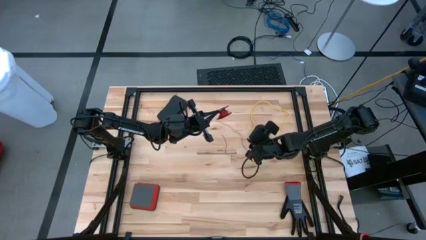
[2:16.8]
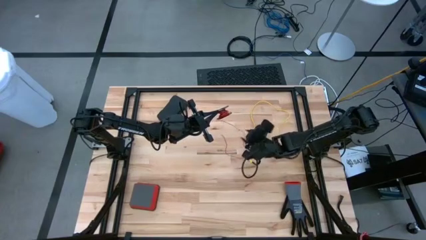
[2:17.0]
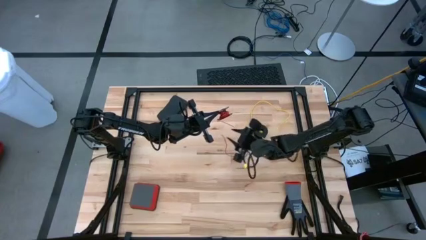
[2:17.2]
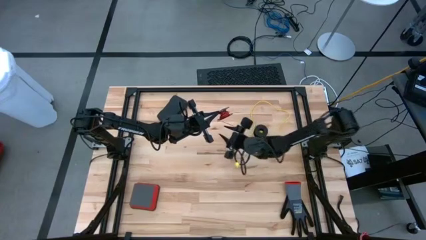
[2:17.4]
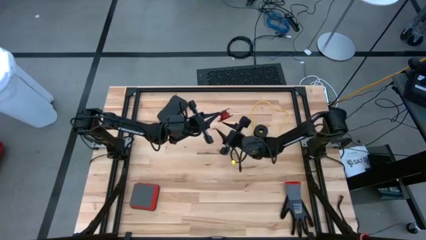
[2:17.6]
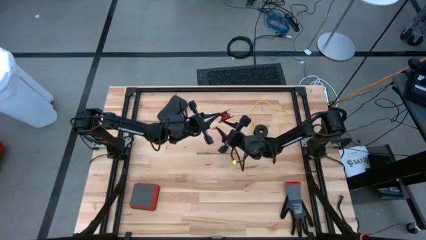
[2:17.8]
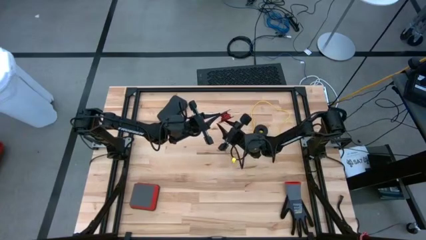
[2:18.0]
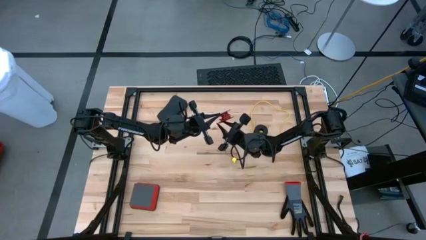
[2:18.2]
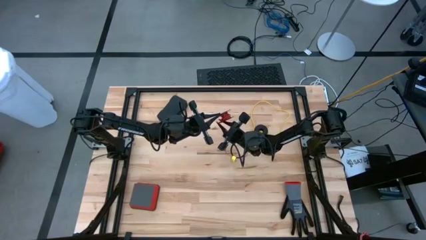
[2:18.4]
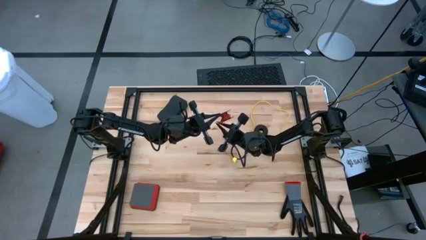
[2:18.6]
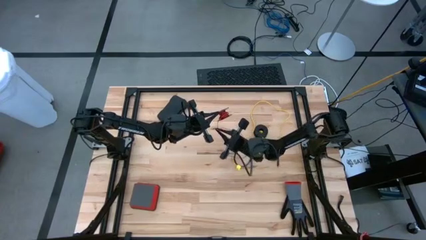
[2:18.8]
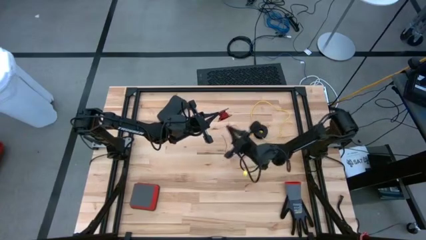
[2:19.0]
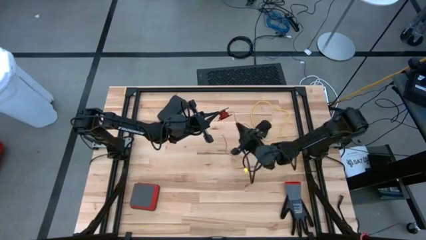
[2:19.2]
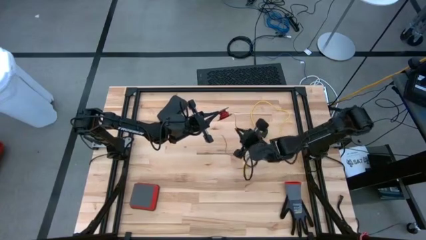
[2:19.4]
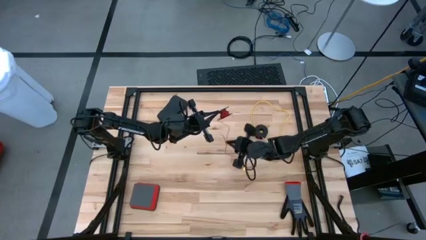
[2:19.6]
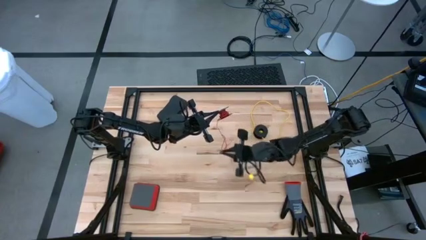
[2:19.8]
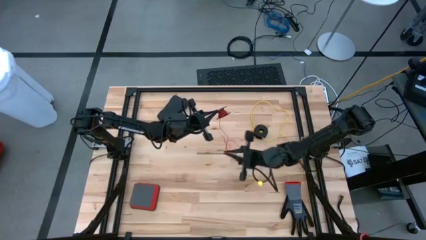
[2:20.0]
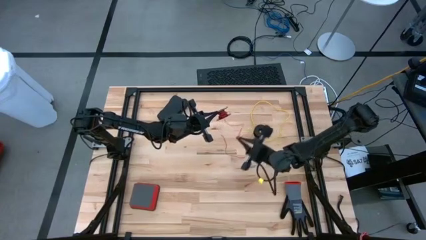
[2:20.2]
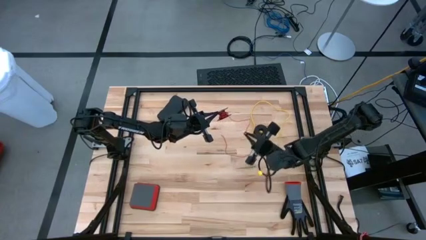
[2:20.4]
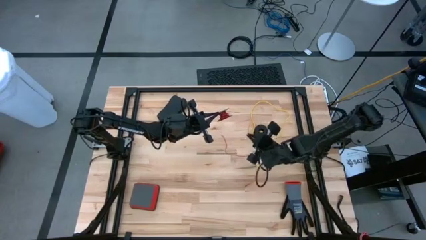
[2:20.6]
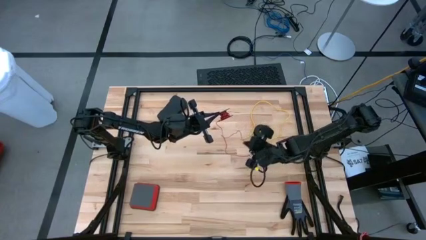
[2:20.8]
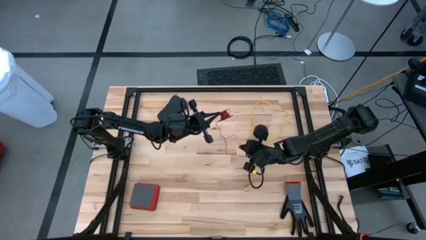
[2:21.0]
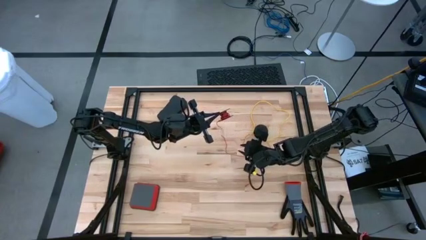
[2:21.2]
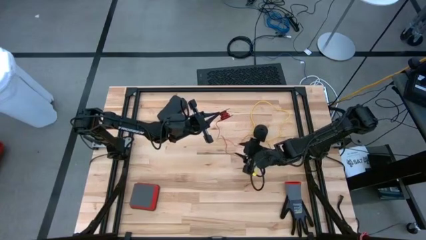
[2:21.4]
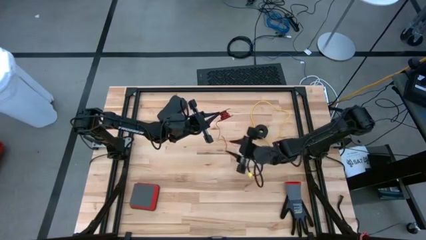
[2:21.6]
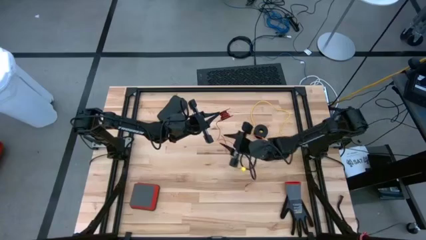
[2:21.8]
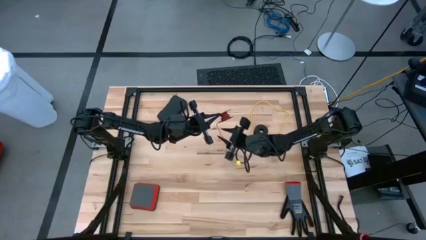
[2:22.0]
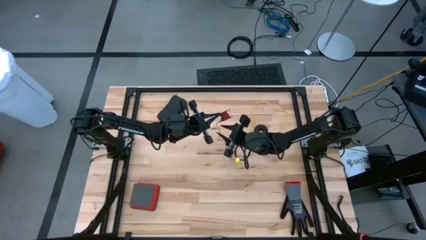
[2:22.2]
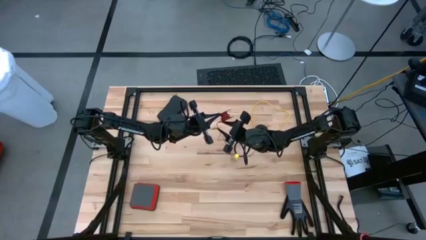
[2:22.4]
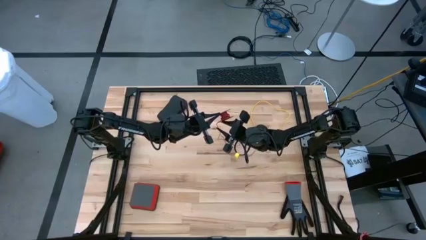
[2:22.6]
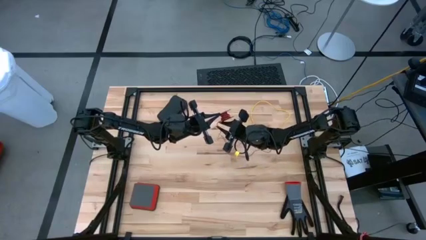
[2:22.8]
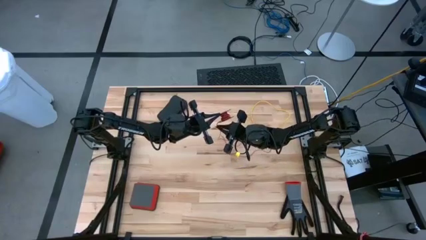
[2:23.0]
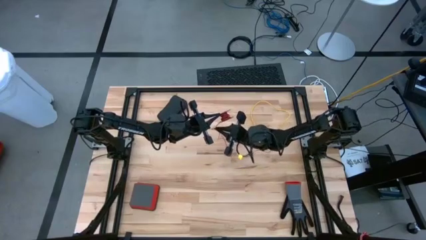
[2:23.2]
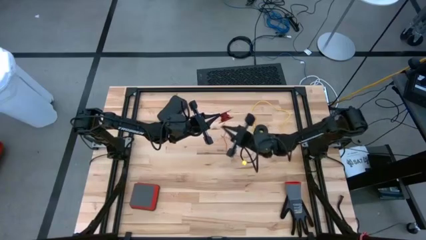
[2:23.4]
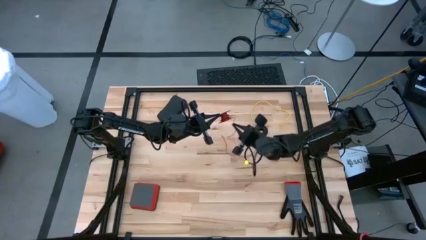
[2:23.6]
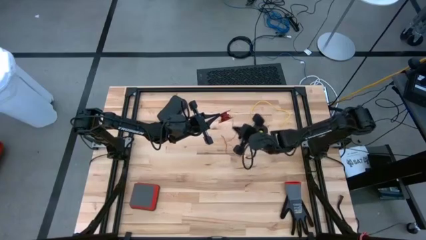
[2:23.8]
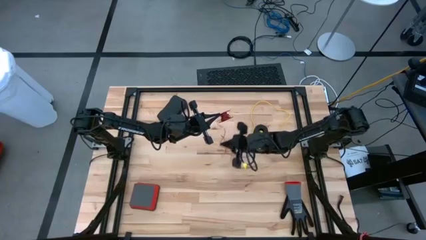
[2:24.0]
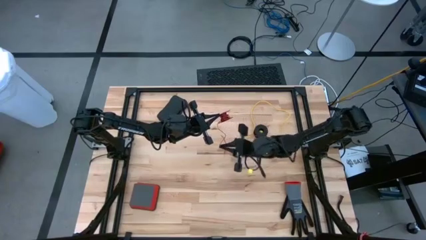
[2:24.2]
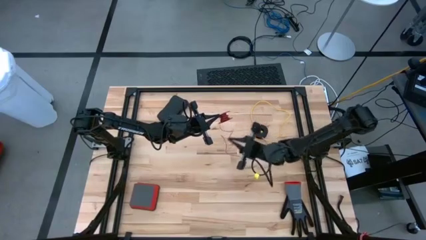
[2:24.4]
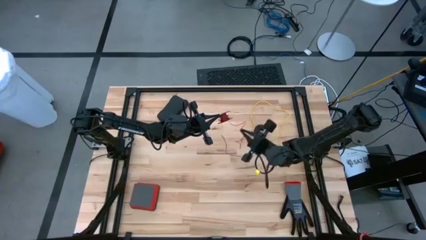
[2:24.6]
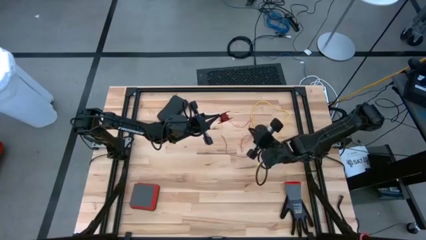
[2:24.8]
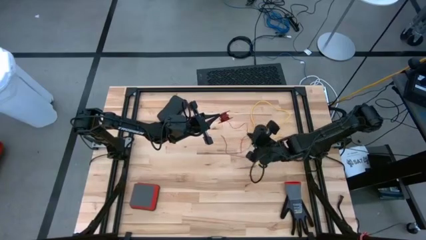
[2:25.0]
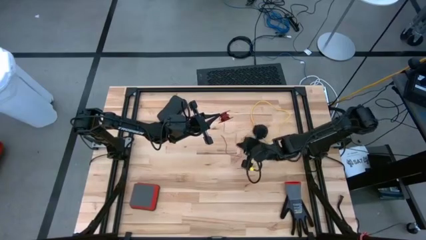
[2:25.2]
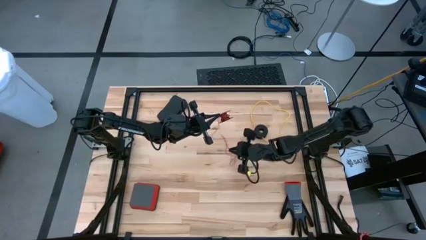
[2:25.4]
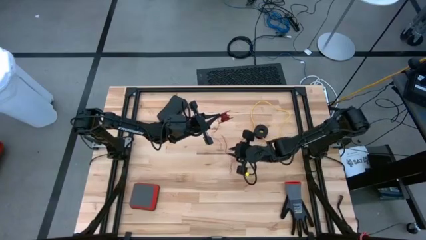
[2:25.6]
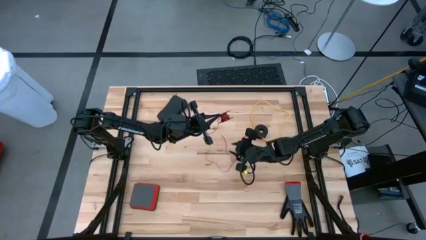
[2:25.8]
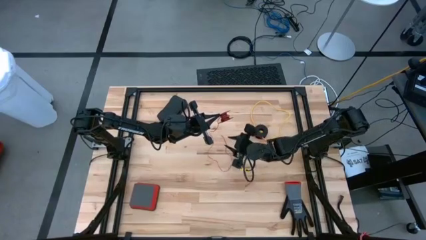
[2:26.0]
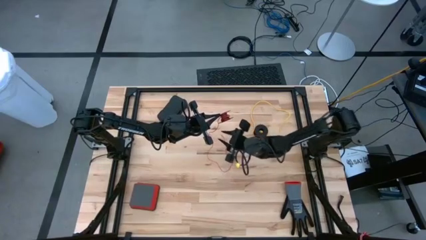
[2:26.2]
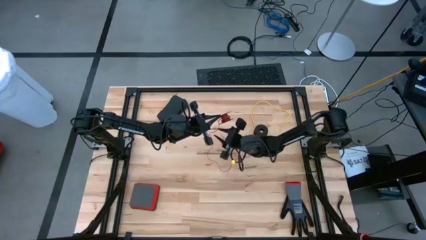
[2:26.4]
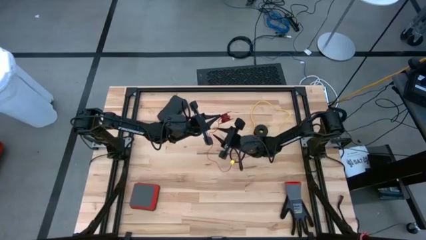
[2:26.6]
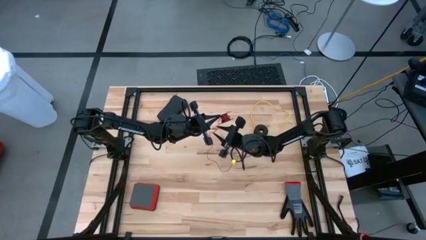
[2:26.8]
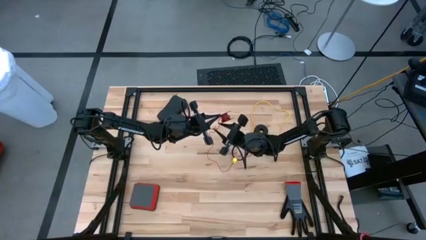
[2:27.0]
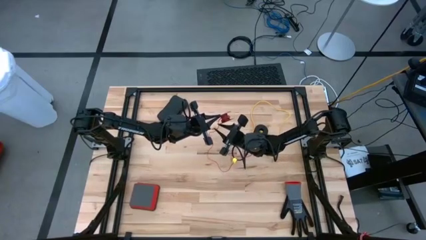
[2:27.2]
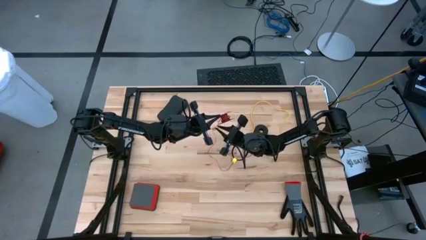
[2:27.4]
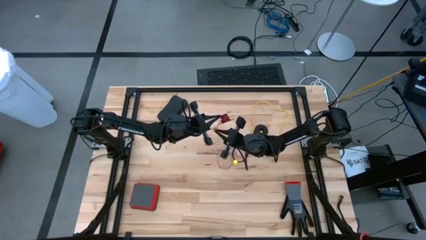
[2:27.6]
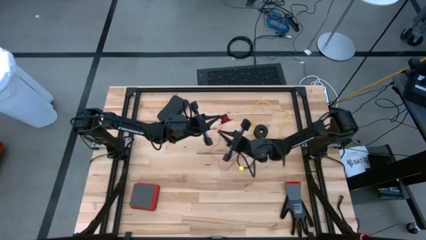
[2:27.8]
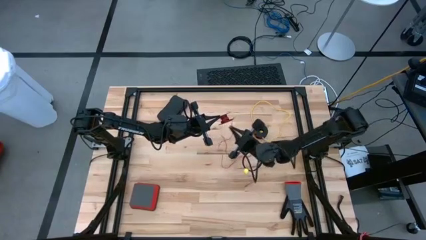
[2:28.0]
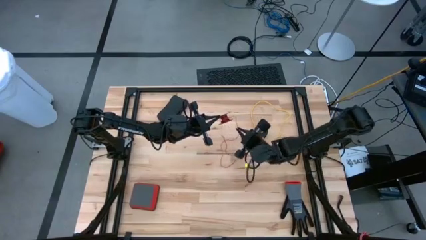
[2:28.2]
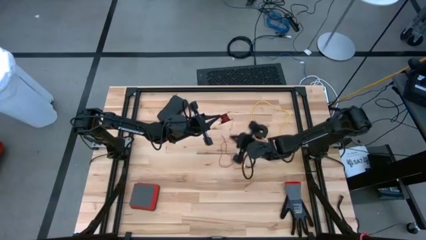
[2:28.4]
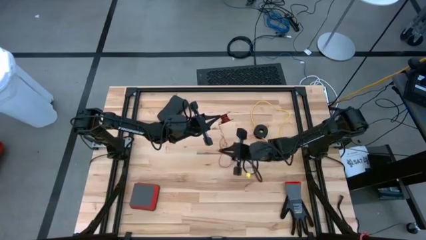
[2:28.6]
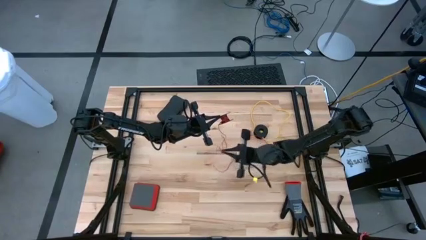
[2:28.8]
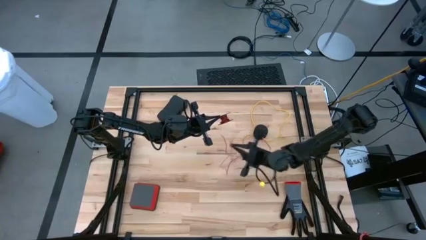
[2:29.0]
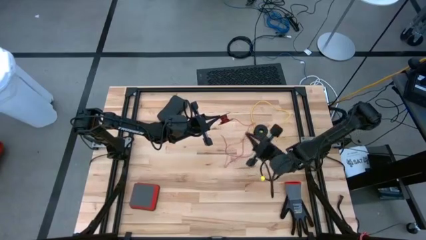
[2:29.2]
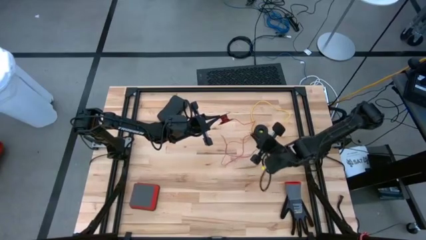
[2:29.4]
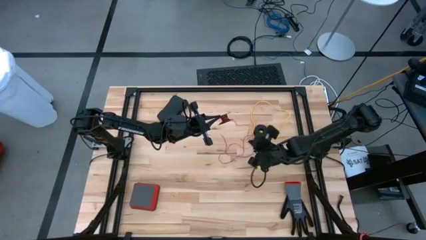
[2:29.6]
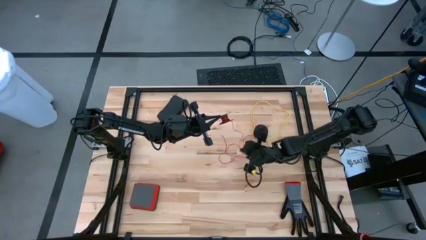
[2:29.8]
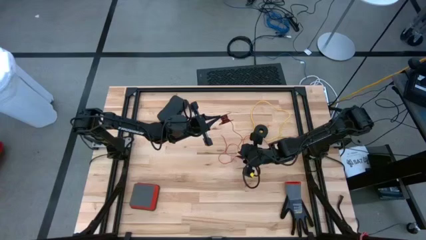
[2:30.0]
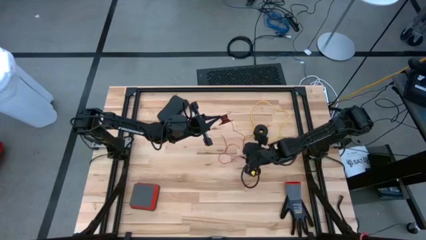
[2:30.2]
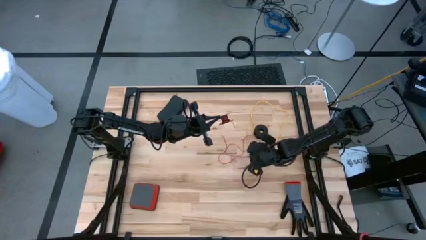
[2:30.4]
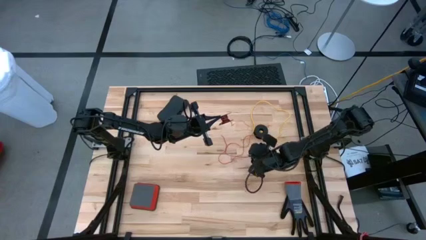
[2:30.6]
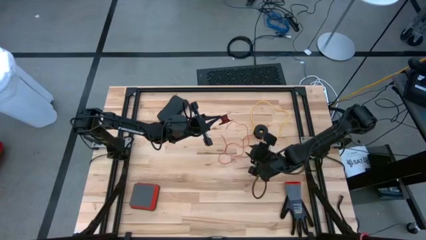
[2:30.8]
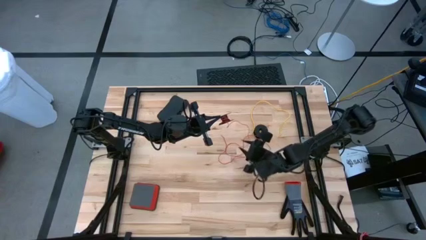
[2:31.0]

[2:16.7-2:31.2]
Task: Coil cords
Uncoil the red wire from the black spool
